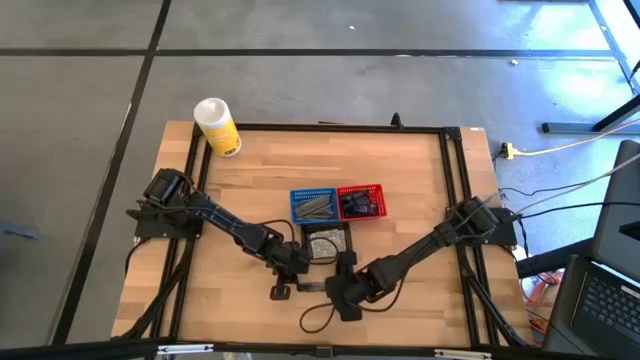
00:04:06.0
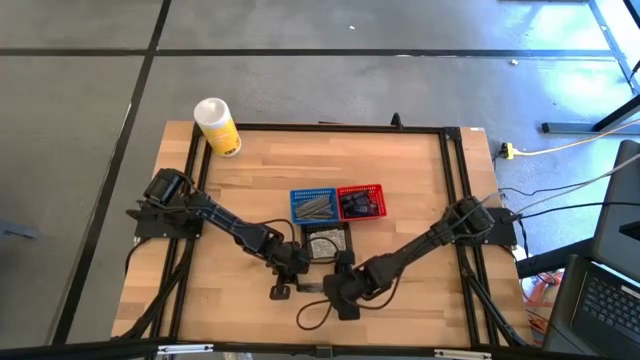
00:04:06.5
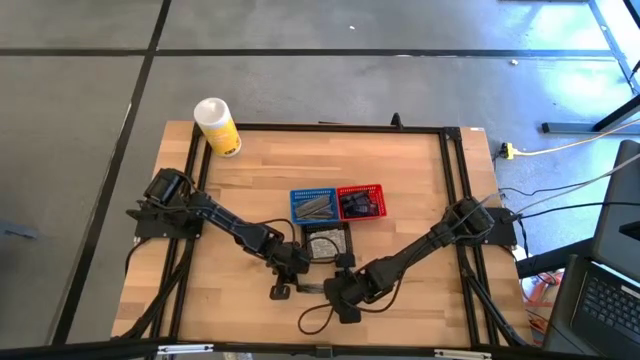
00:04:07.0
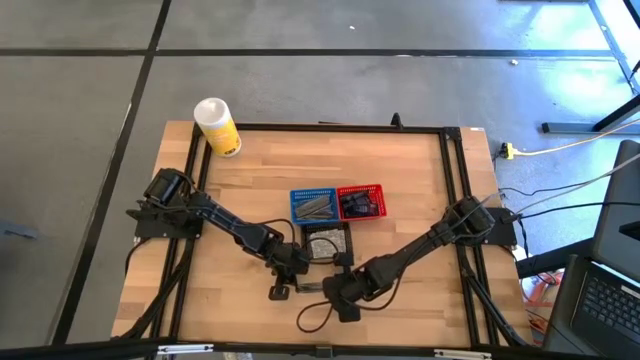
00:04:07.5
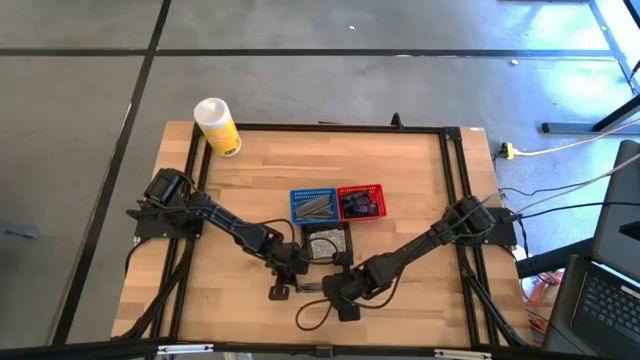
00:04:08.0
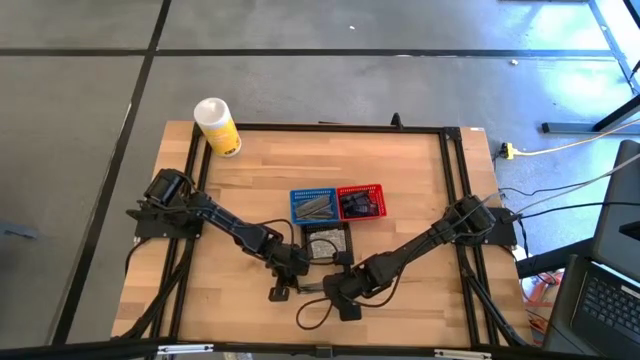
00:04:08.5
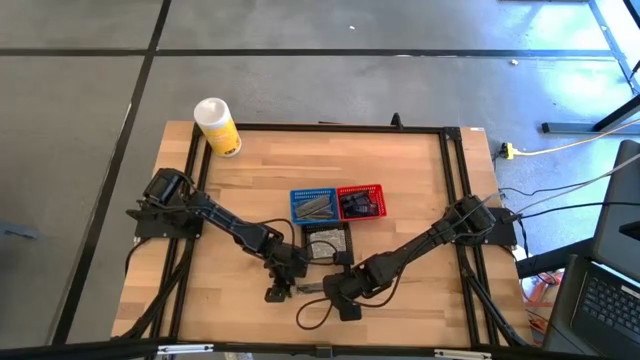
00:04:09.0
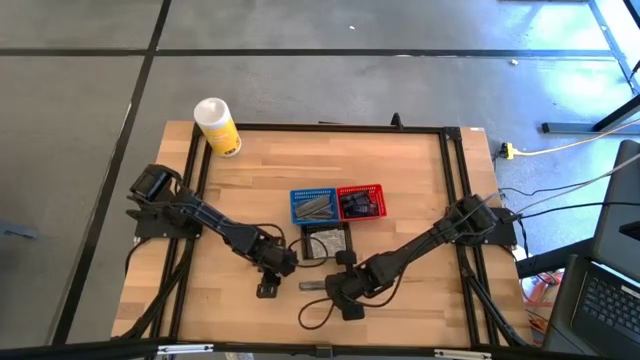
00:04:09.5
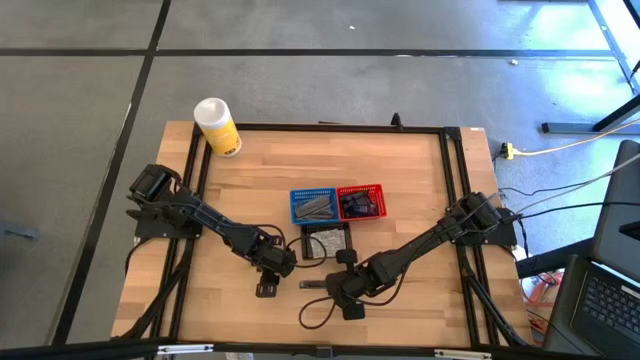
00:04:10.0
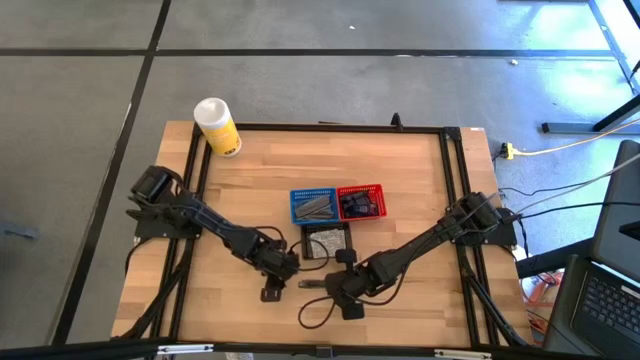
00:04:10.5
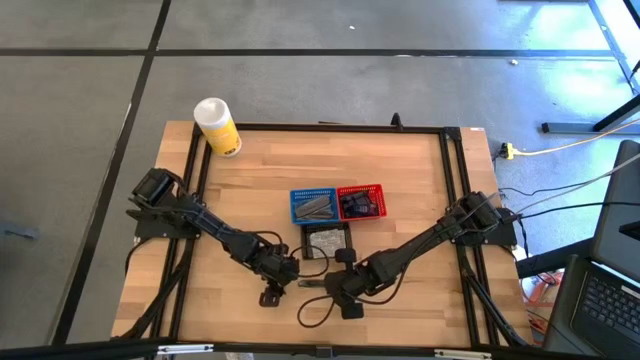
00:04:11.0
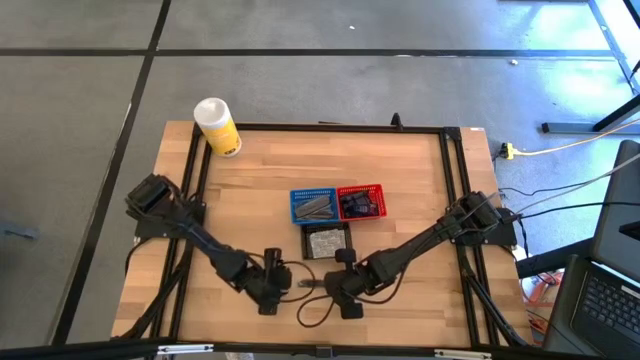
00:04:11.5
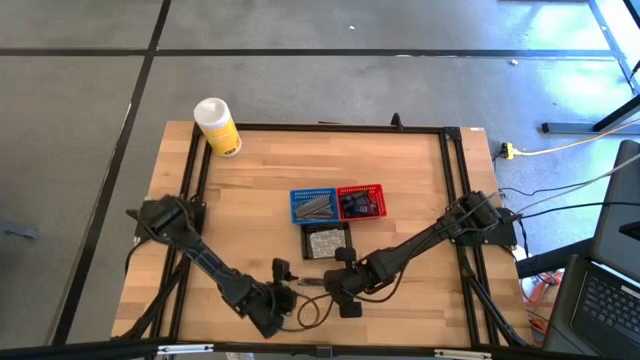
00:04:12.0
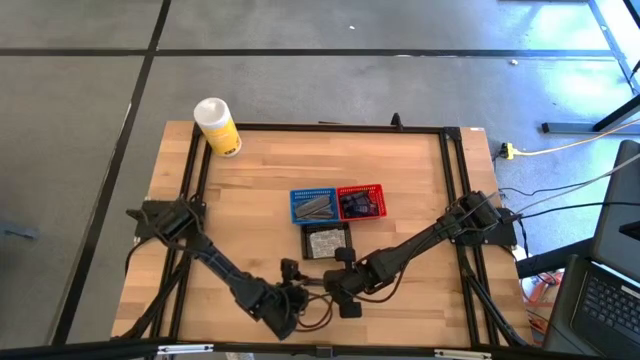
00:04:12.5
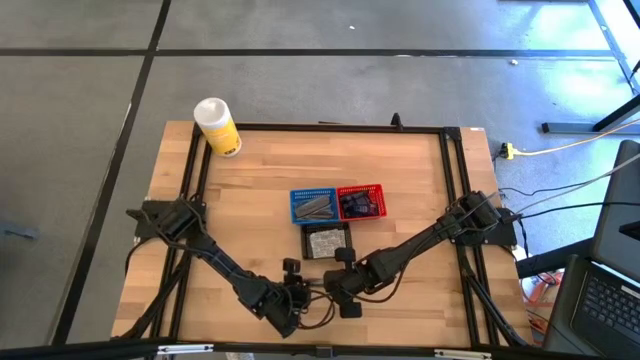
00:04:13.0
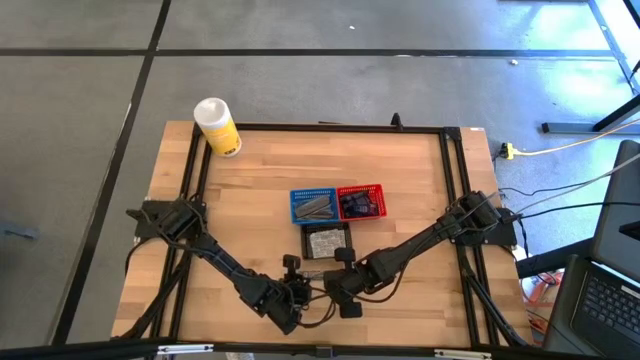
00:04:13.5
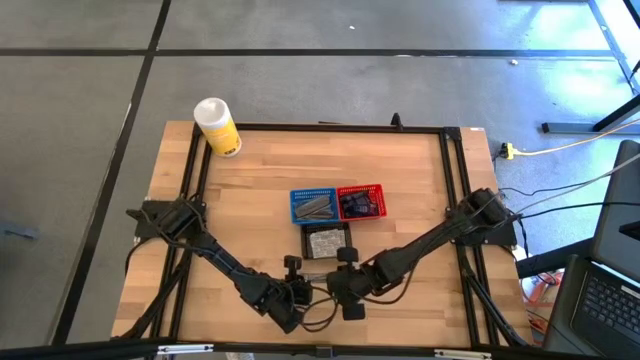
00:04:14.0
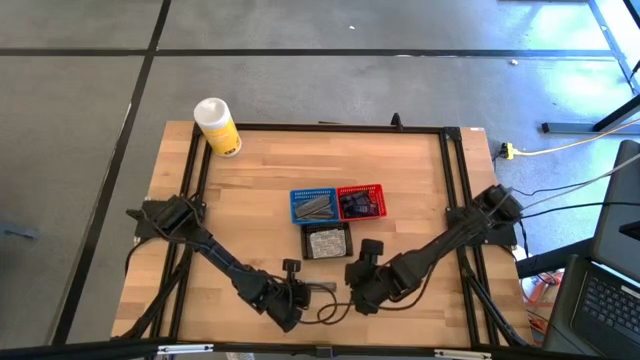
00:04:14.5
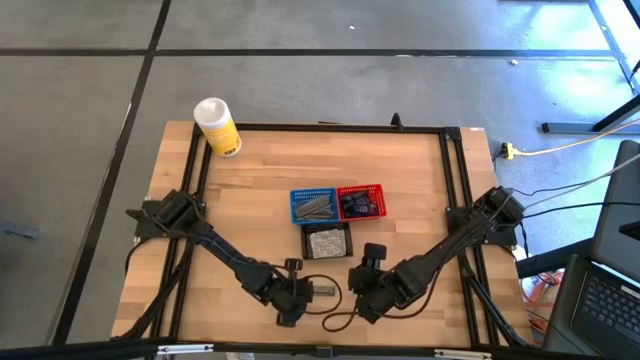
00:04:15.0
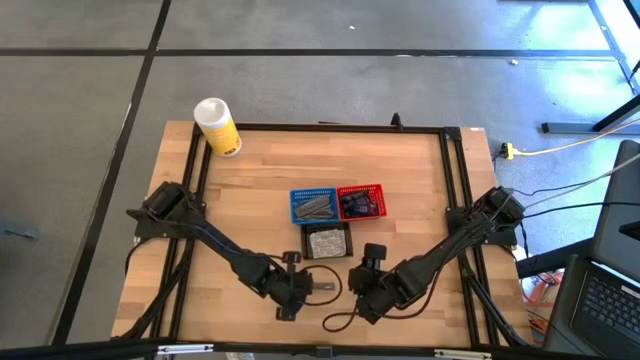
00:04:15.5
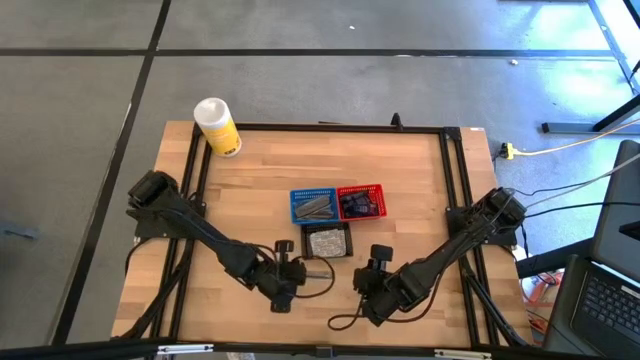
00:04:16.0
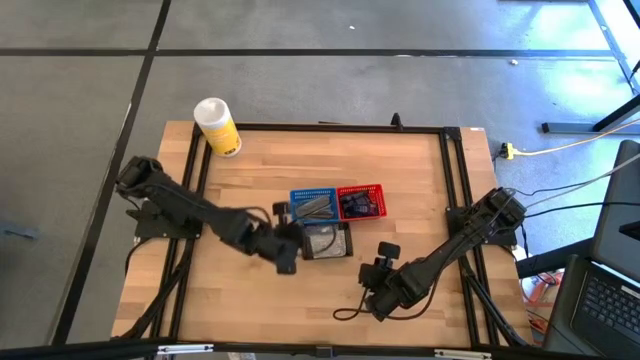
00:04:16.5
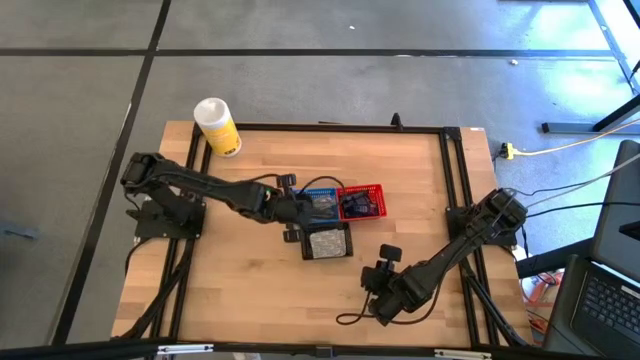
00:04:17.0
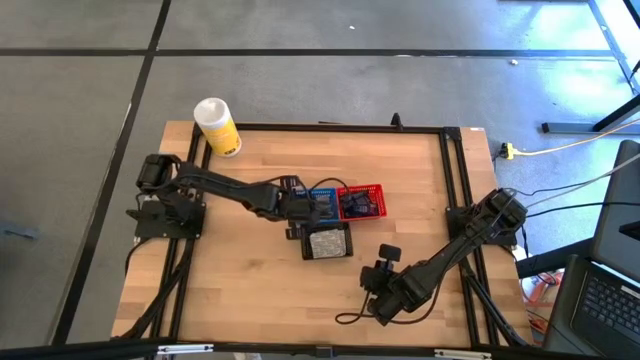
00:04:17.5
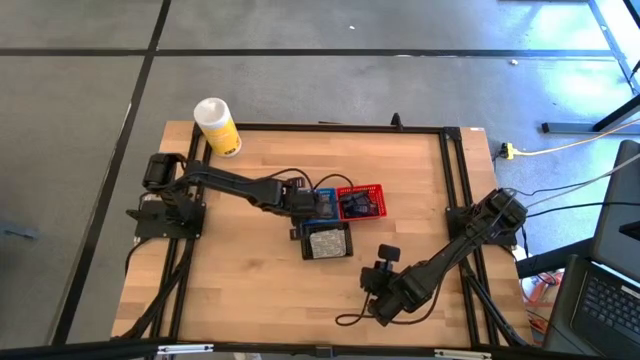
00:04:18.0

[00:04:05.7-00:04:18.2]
Task: Pick & Place Travel size toiletries
Put the black comb into the blue bin

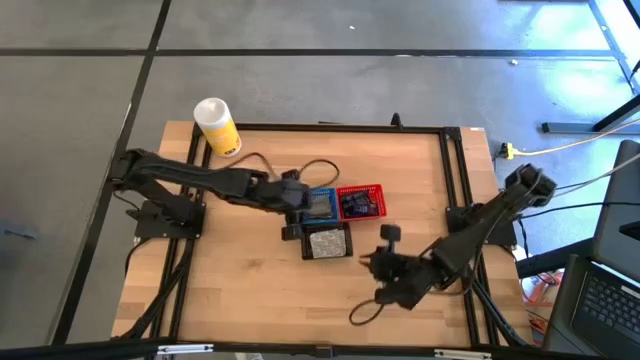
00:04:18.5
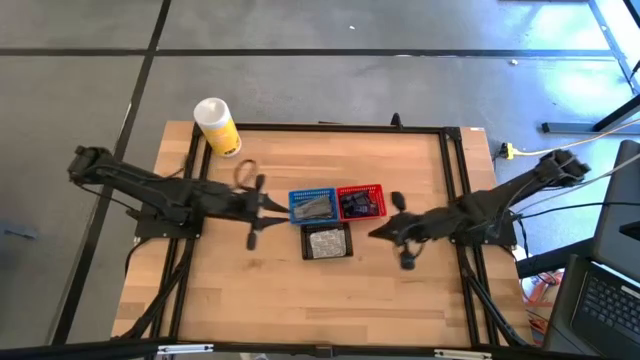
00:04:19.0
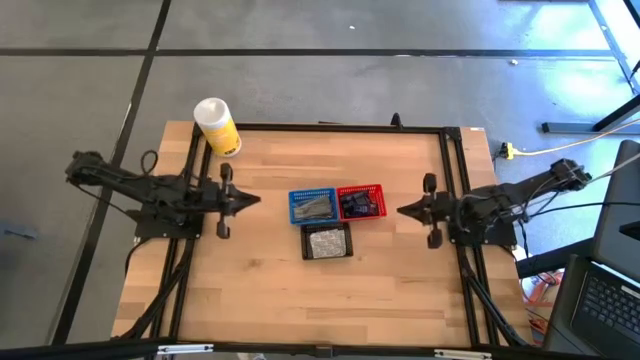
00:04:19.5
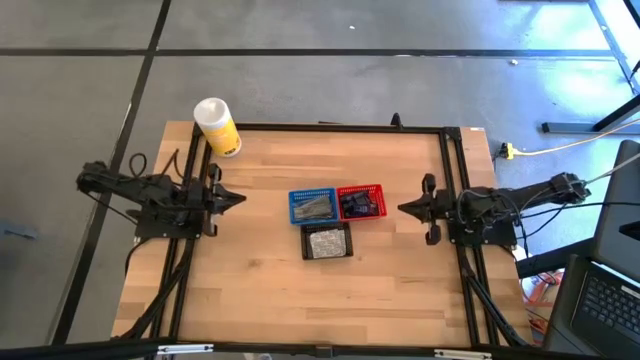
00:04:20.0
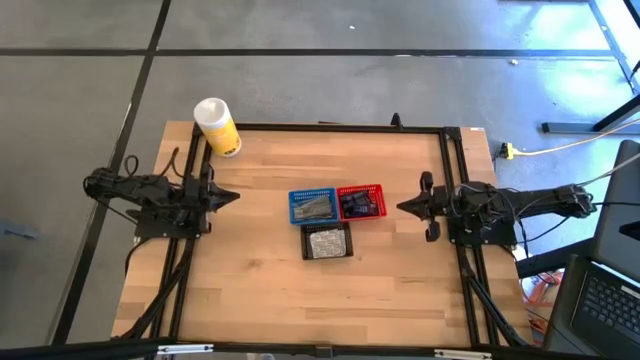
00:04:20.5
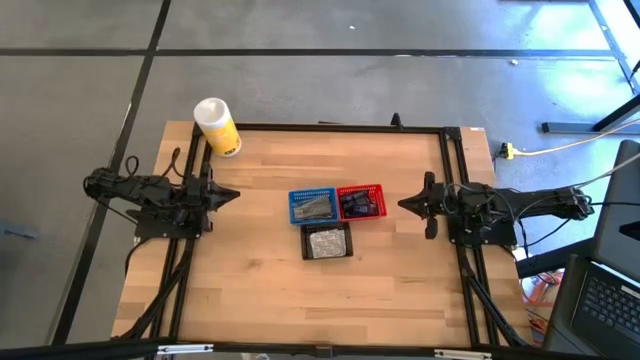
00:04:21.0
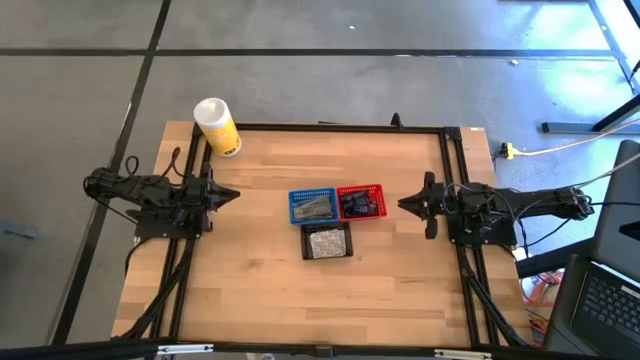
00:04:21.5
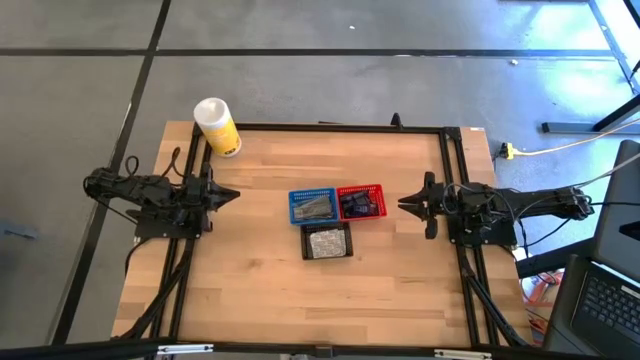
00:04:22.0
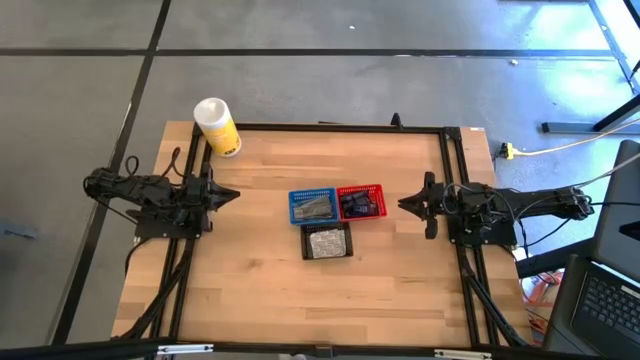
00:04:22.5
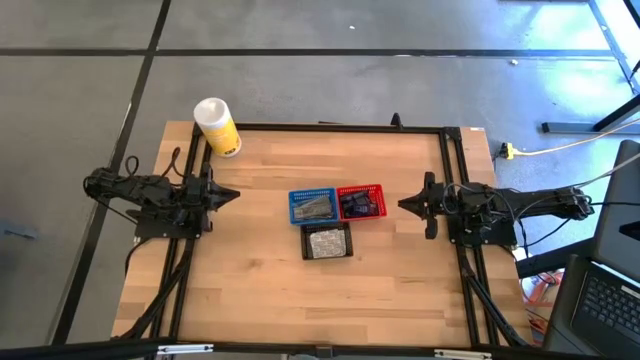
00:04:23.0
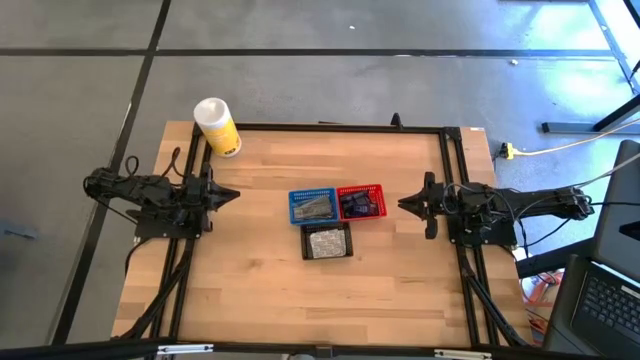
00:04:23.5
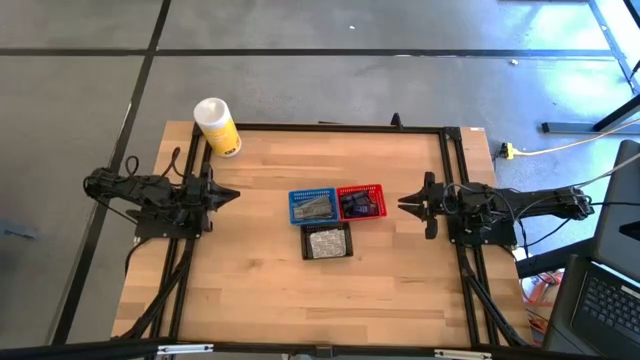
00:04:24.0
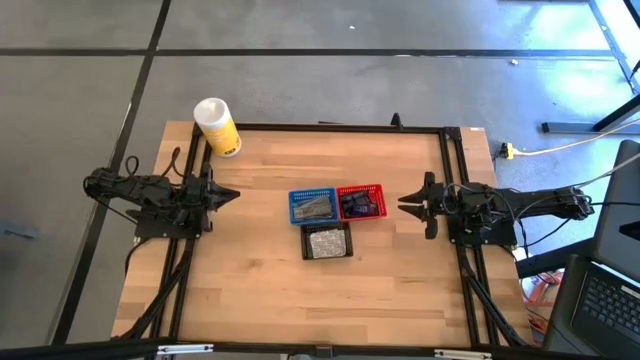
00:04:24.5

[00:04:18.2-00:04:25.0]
Return to Home Position

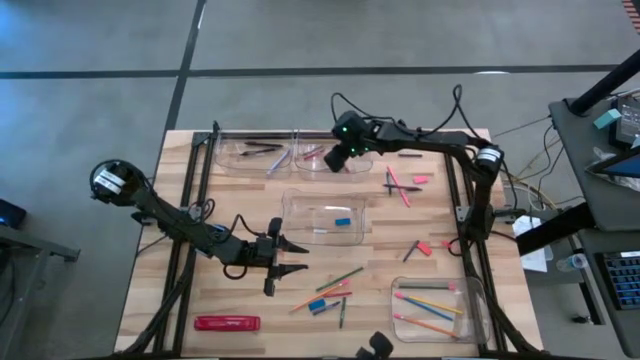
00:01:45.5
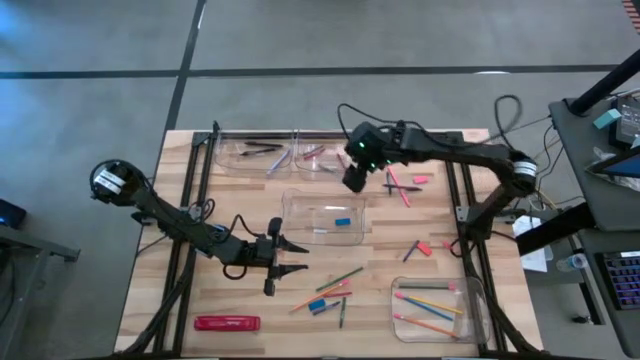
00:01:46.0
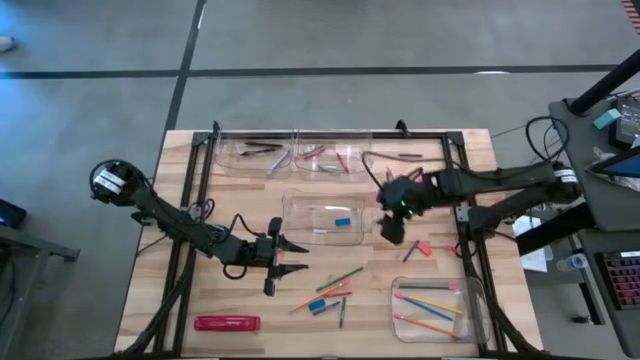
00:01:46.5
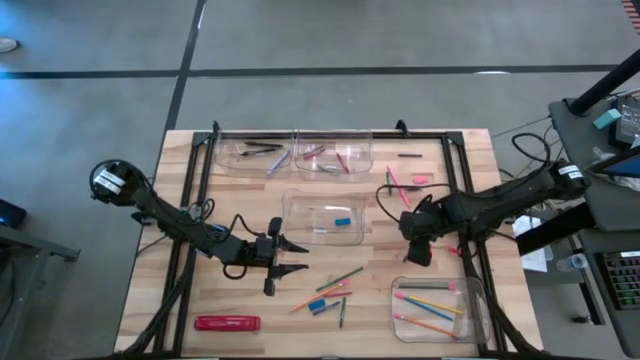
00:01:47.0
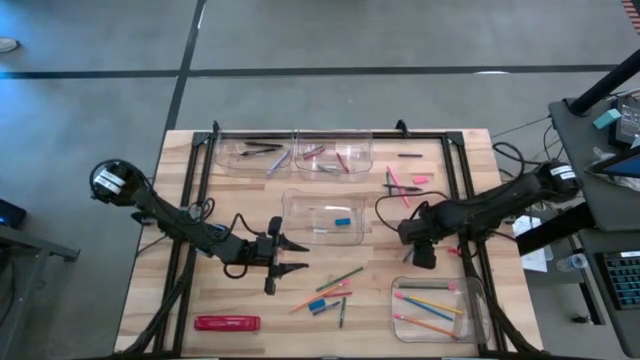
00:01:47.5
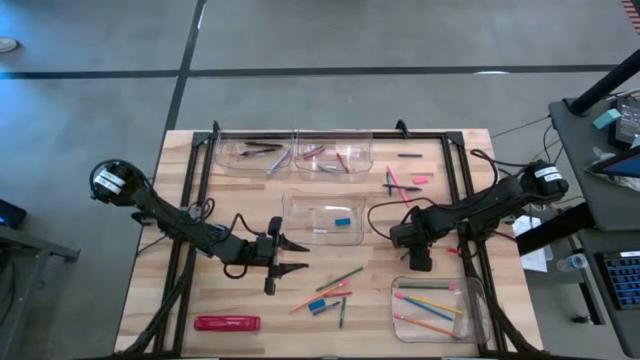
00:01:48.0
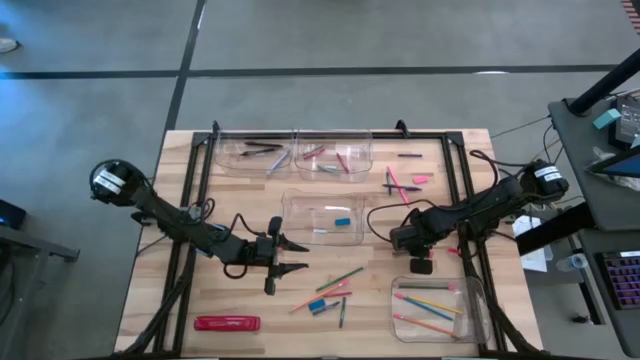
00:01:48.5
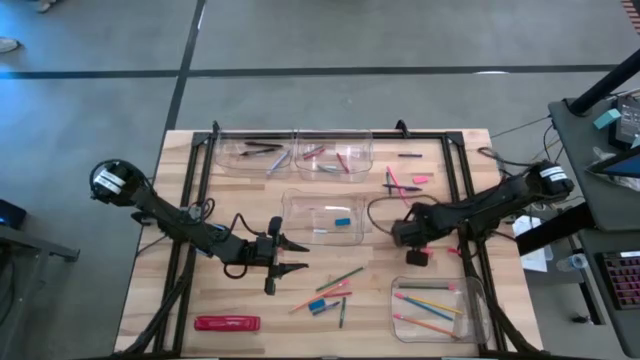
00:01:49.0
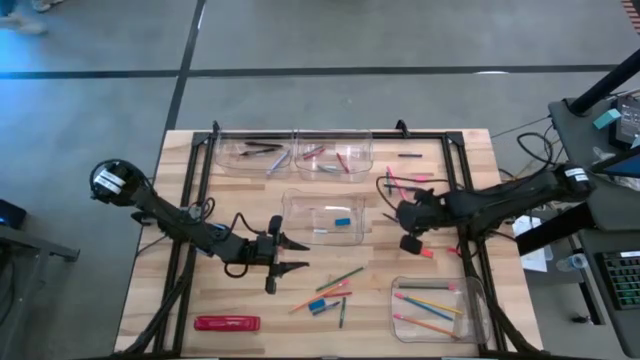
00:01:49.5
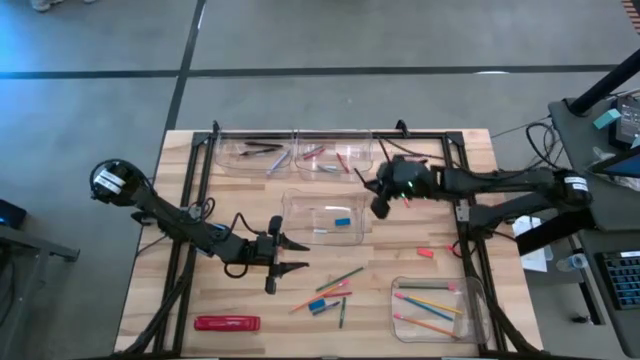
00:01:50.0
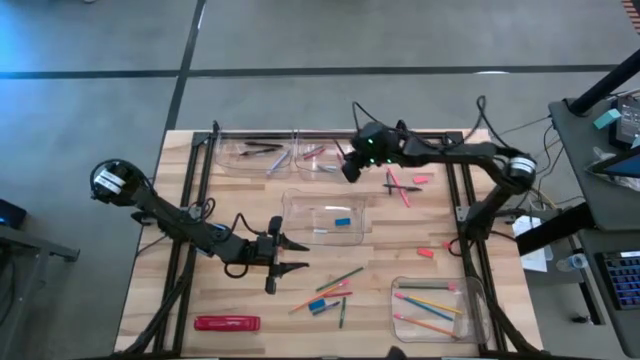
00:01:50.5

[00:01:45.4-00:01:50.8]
Task: Sort crayons/erasers/pens/pencils in bins
Put the blue crayon into the top right transparent bin
